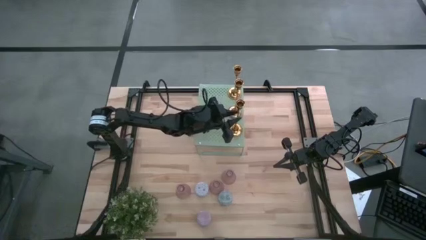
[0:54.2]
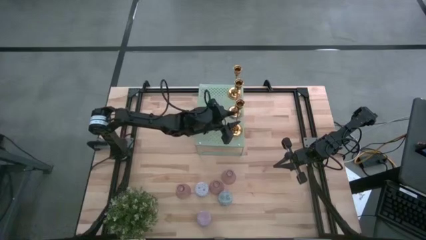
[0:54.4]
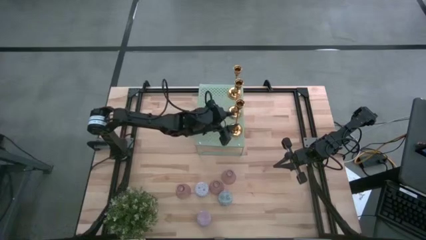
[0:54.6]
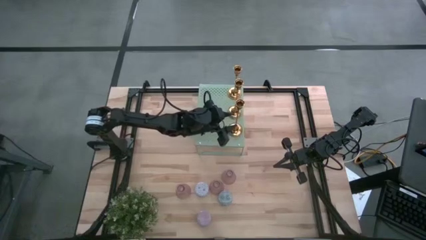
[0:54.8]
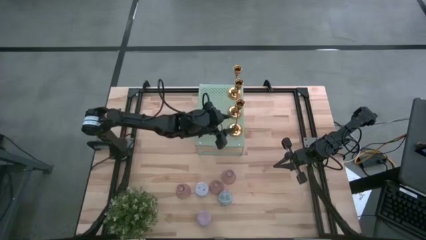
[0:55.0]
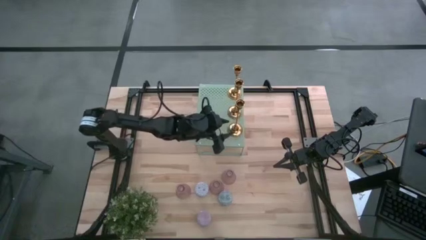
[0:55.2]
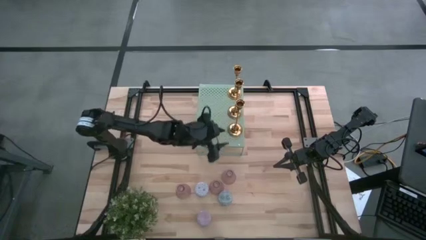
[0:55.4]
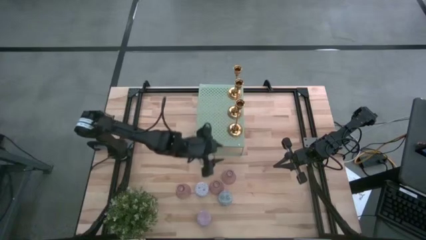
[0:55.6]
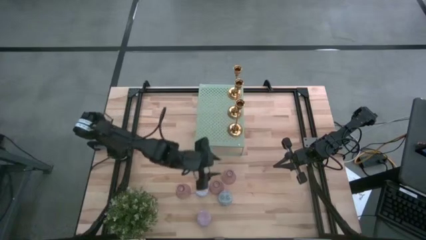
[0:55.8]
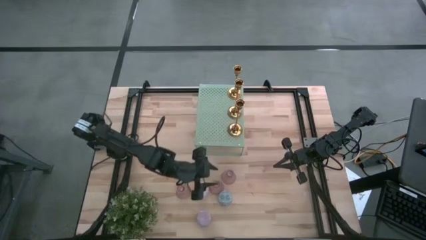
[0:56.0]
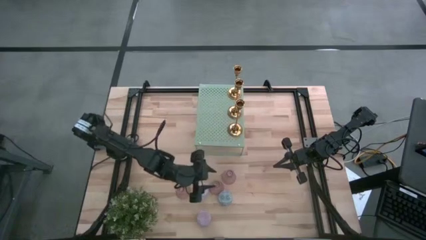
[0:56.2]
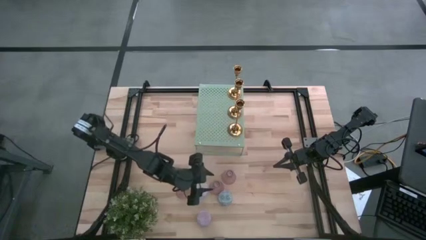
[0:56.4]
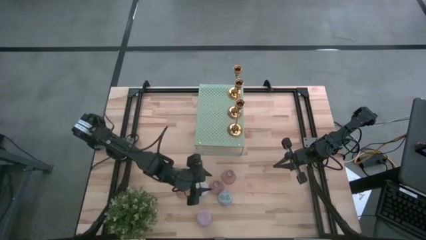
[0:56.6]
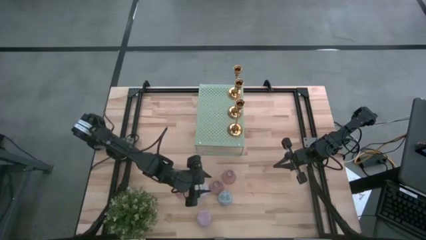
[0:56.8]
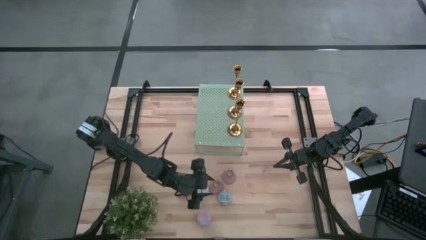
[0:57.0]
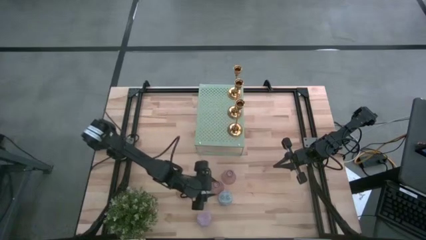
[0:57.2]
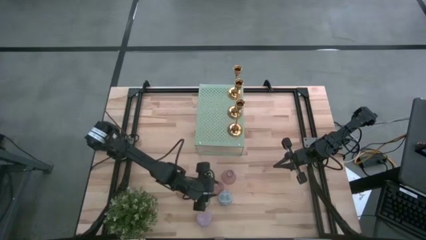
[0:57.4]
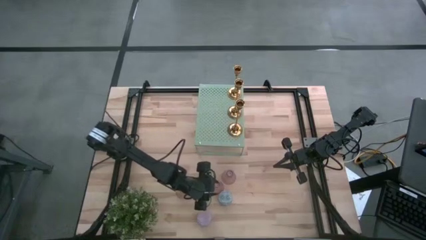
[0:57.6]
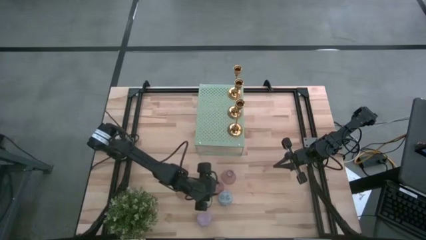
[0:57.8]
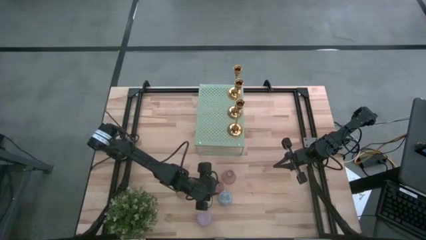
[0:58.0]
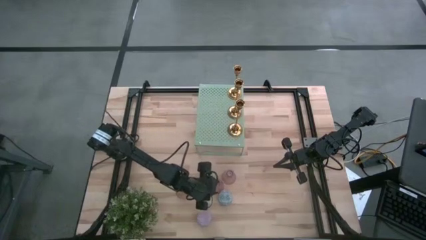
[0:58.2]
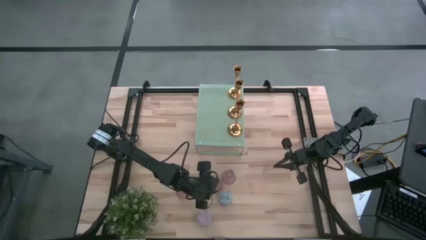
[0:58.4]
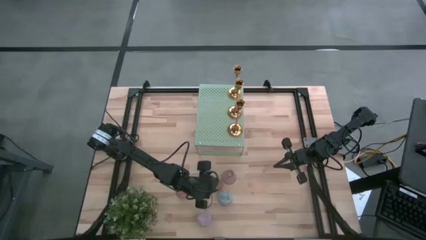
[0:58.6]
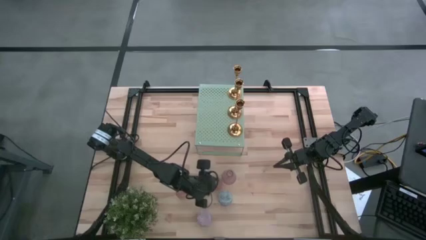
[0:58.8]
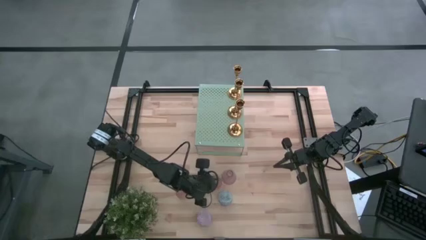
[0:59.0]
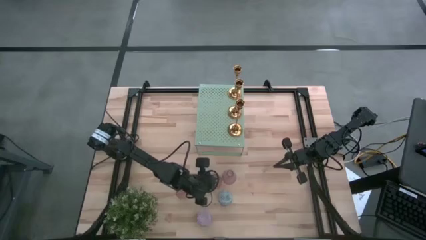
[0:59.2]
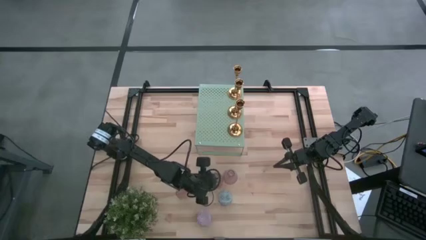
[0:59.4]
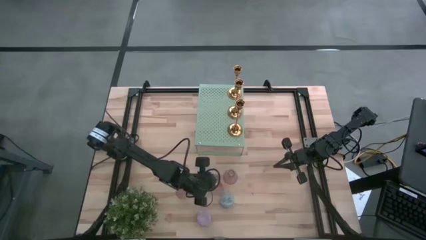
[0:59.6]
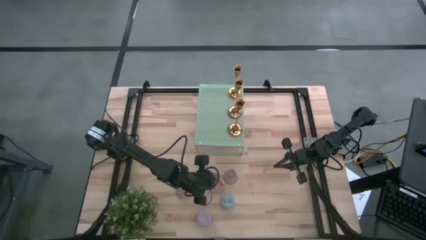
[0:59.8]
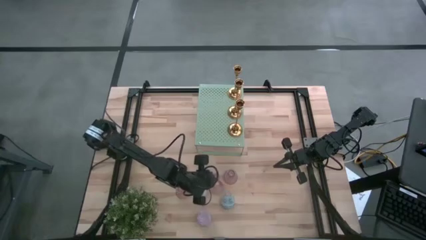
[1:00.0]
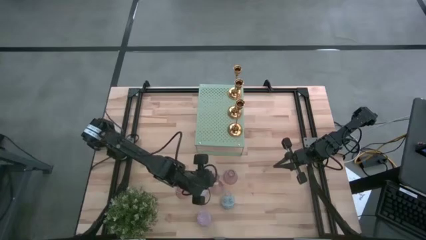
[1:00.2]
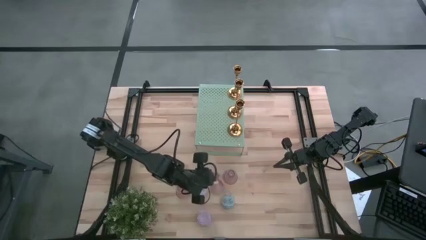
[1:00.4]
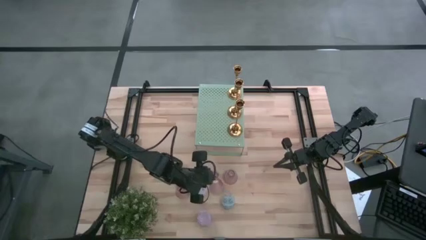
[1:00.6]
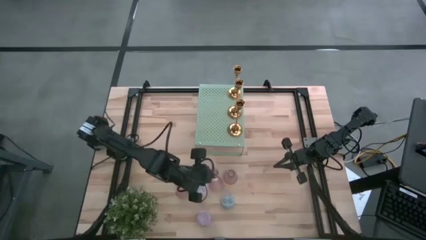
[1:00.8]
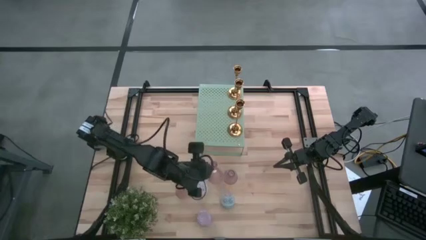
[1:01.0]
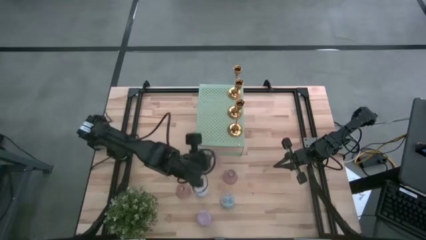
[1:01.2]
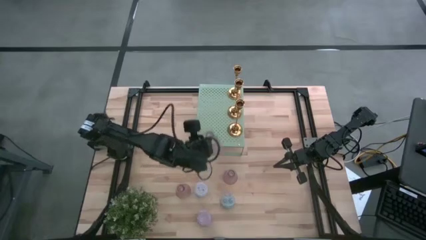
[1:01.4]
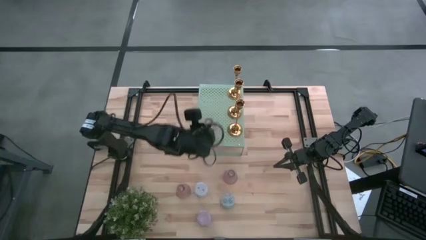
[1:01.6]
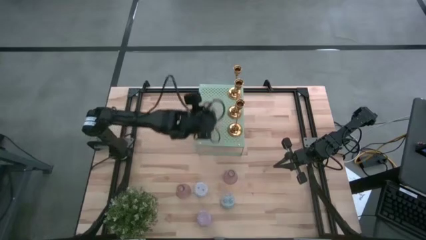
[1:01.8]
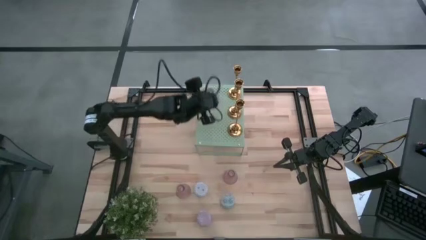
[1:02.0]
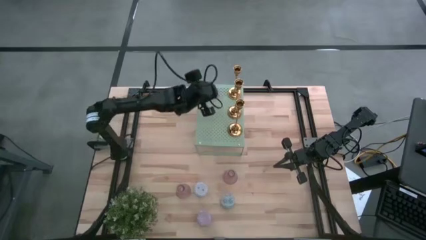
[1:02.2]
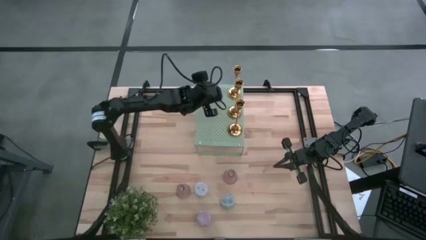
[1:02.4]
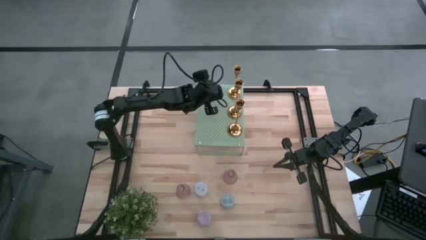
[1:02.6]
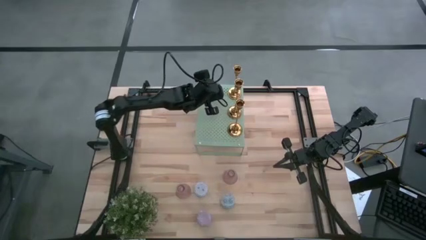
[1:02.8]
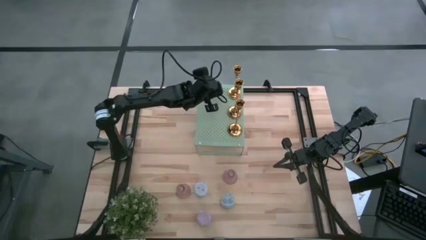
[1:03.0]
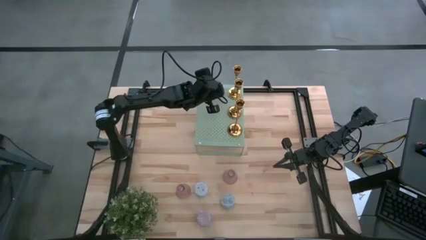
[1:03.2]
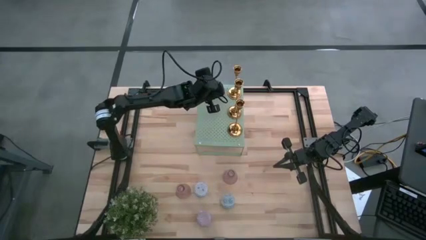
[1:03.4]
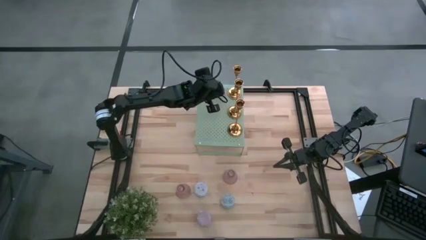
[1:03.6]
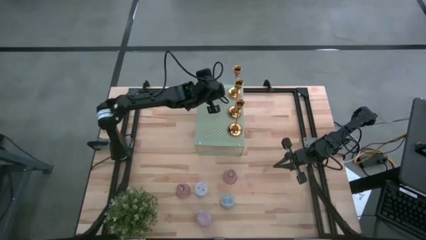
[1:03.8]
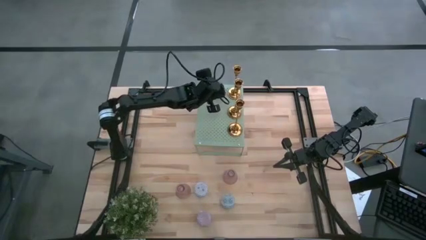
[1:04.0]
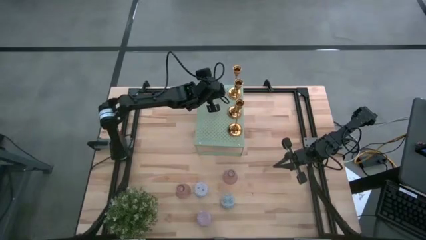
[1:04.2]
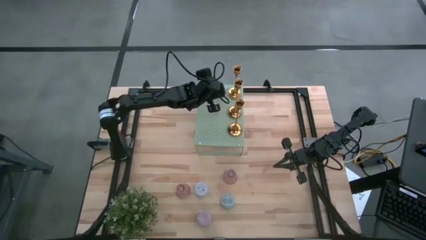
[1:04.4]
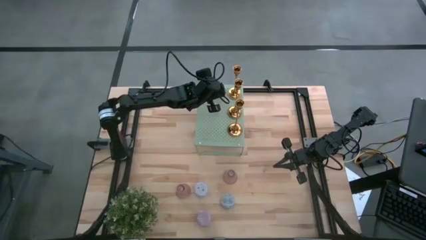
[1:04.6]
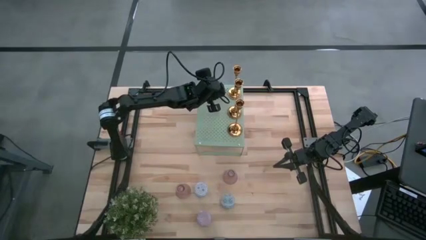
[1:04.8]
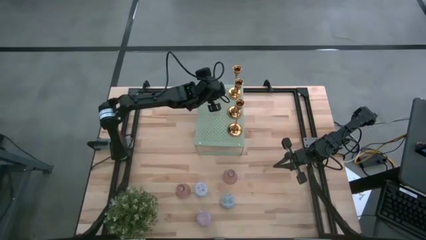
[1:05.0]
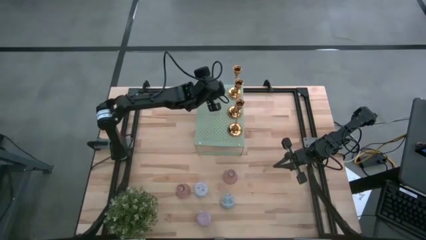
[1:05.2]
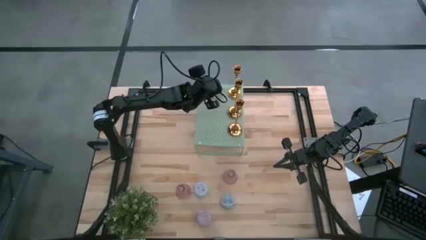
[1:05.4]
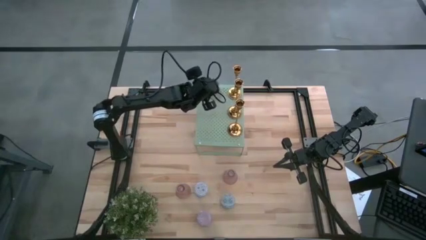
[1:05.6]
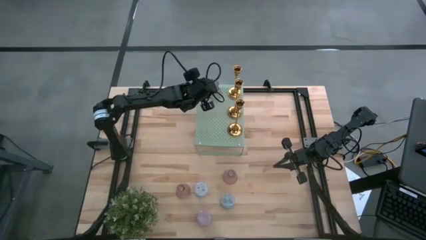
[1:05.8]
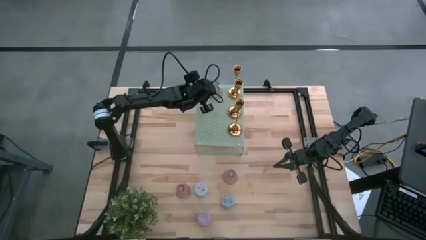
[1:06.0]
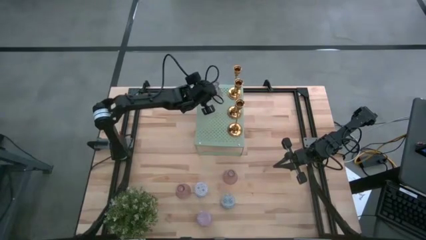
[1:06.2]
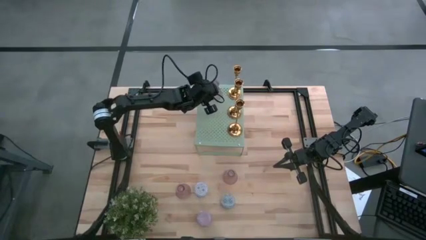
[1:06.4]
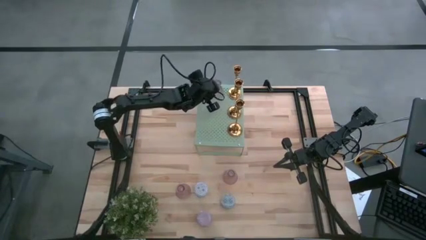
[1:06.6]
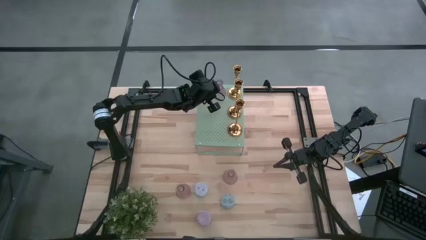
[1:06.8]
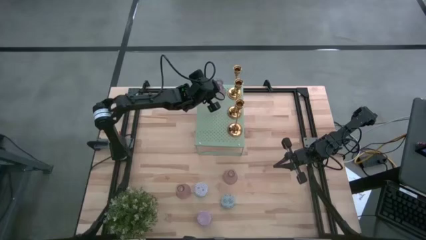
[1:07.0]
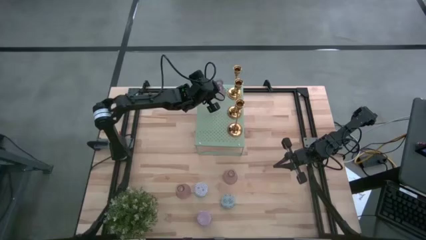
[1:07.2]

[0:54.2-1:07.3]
Task: Pick & Place candle stick holders
Put the bottom right pink candle holder on the shelf
